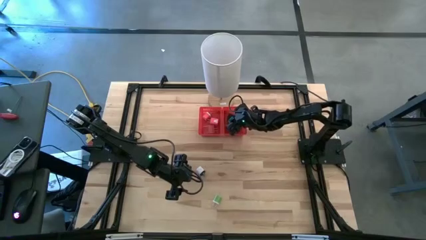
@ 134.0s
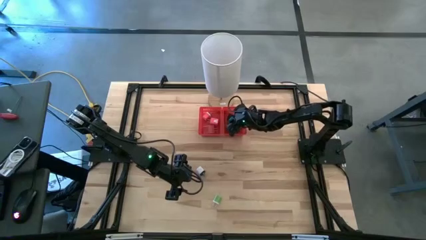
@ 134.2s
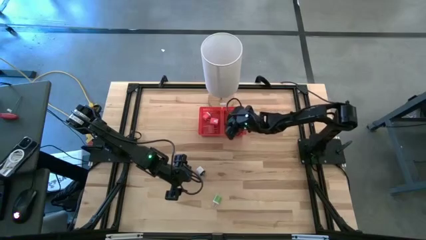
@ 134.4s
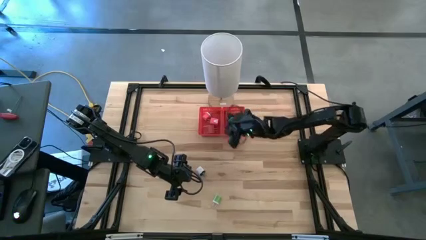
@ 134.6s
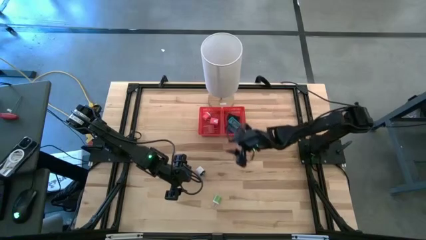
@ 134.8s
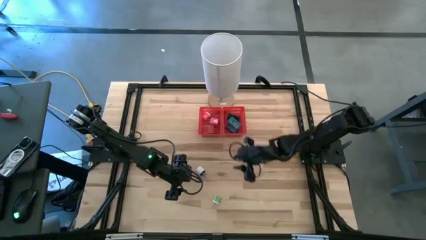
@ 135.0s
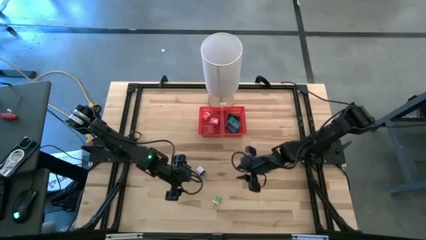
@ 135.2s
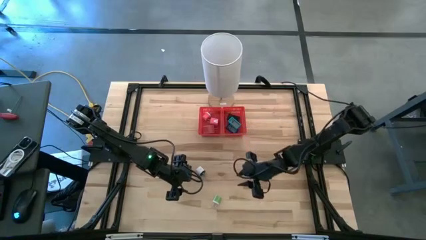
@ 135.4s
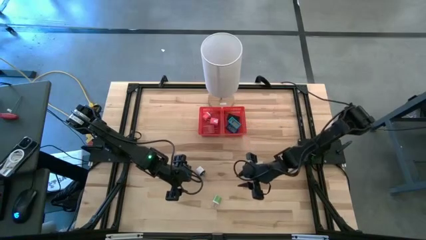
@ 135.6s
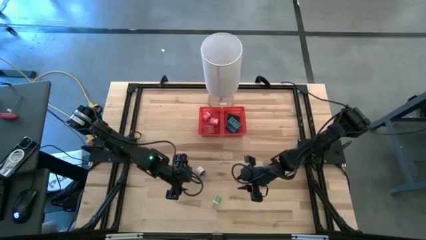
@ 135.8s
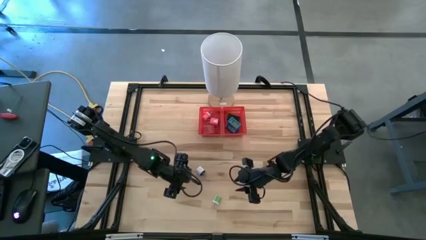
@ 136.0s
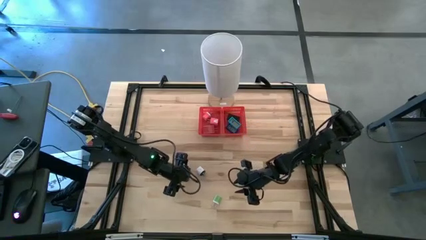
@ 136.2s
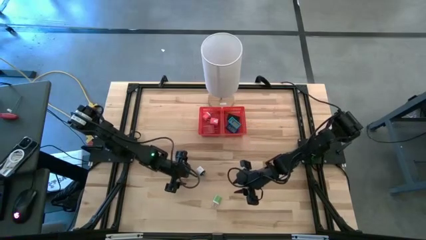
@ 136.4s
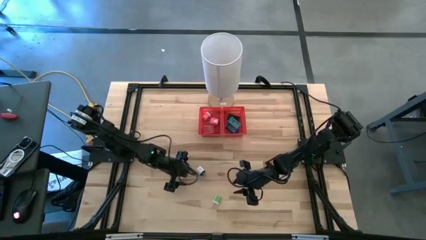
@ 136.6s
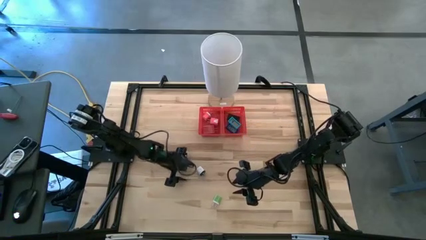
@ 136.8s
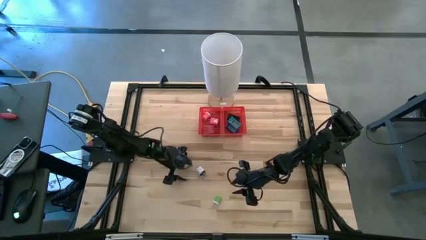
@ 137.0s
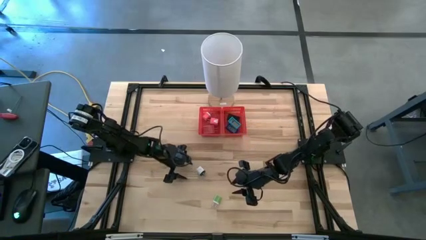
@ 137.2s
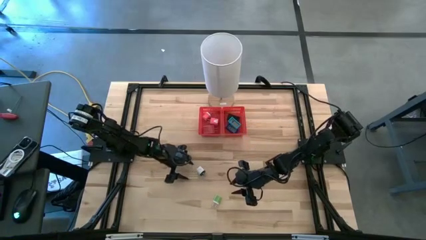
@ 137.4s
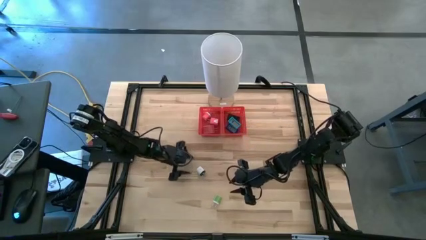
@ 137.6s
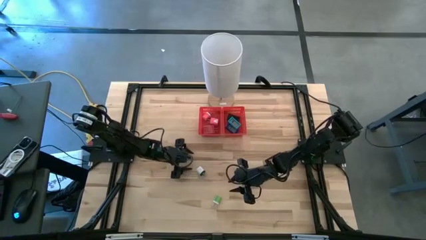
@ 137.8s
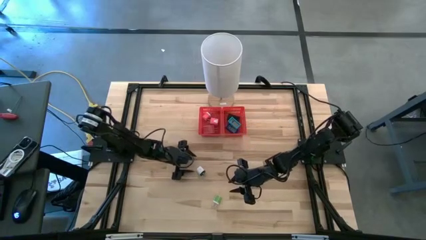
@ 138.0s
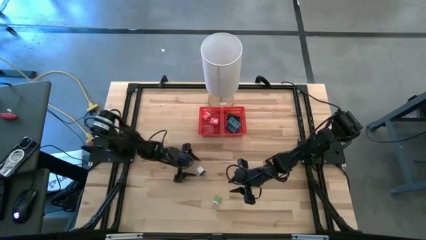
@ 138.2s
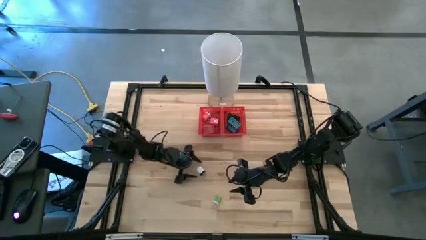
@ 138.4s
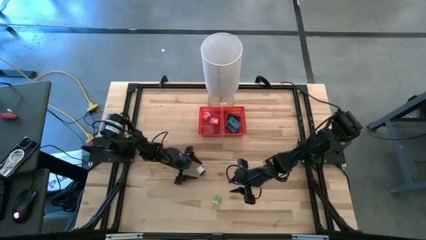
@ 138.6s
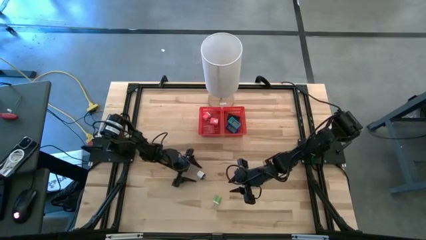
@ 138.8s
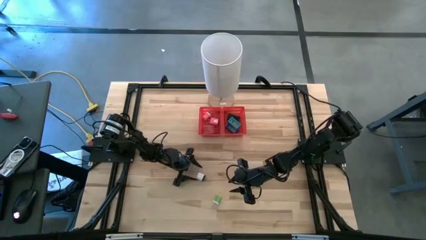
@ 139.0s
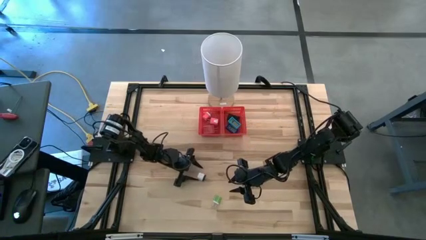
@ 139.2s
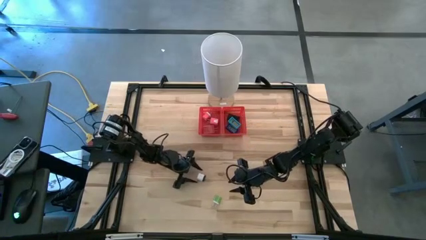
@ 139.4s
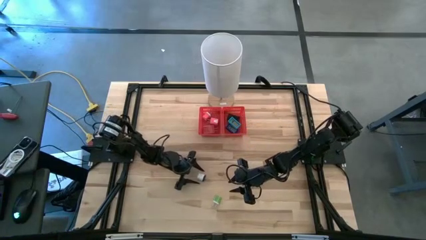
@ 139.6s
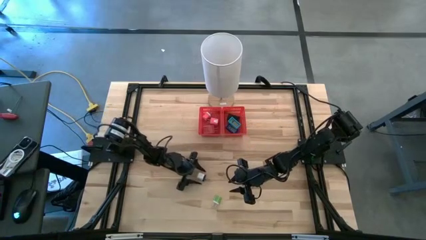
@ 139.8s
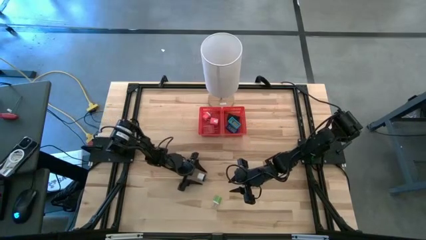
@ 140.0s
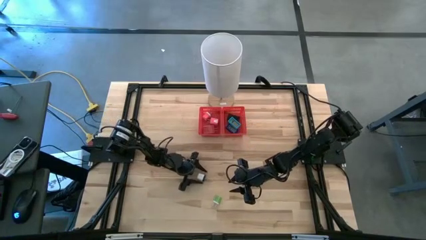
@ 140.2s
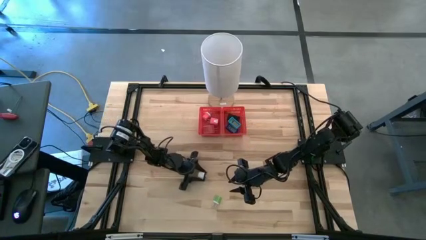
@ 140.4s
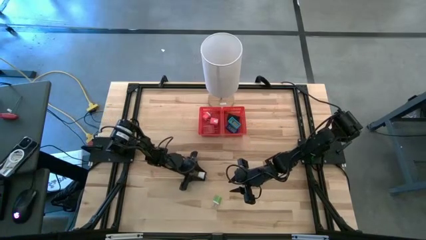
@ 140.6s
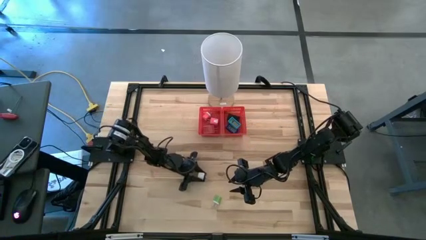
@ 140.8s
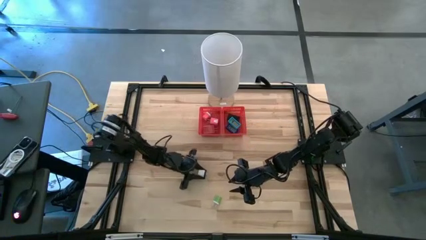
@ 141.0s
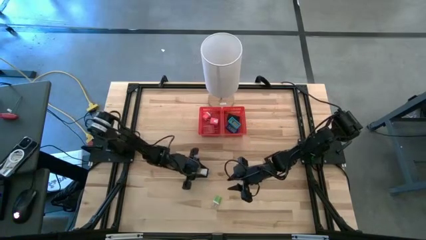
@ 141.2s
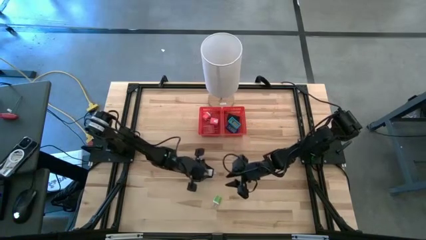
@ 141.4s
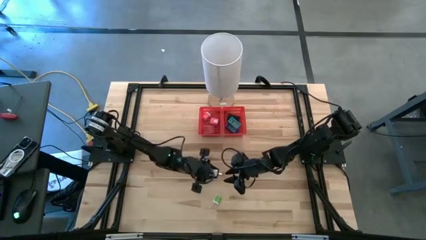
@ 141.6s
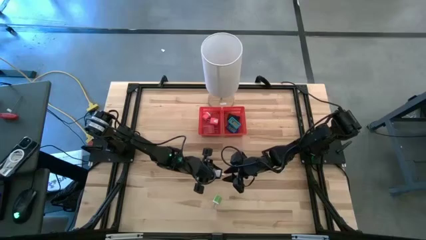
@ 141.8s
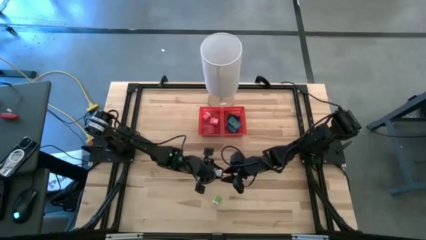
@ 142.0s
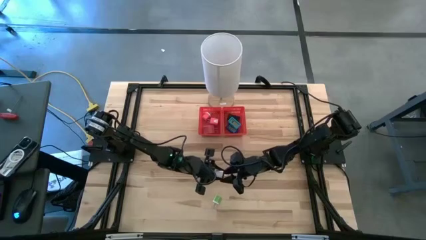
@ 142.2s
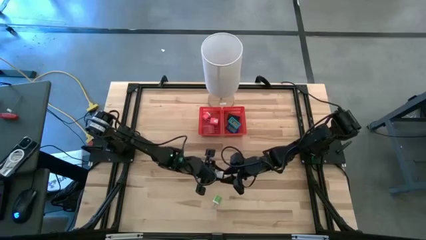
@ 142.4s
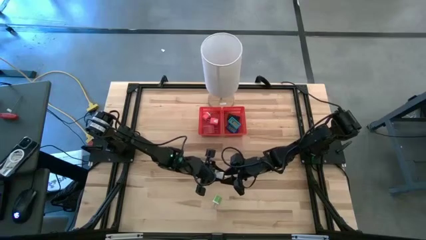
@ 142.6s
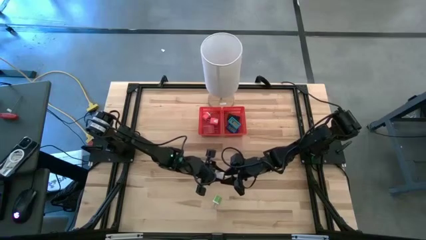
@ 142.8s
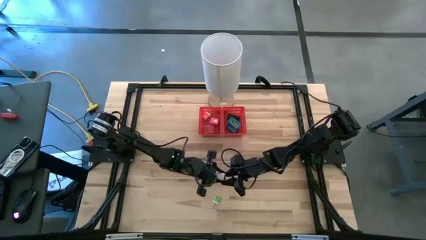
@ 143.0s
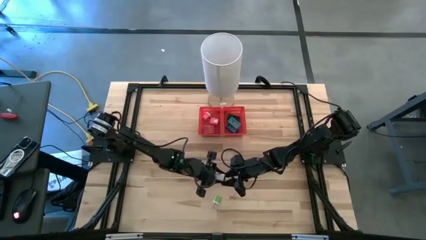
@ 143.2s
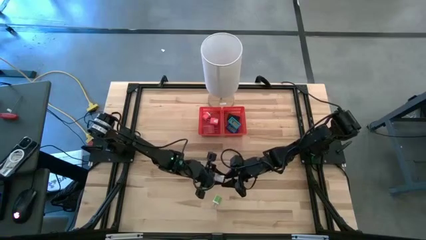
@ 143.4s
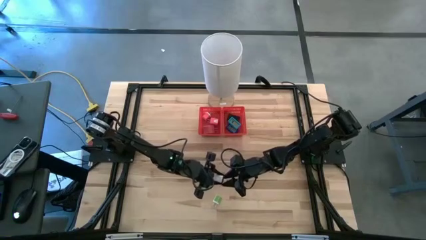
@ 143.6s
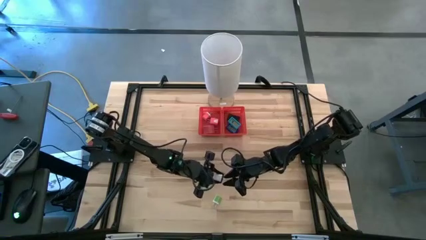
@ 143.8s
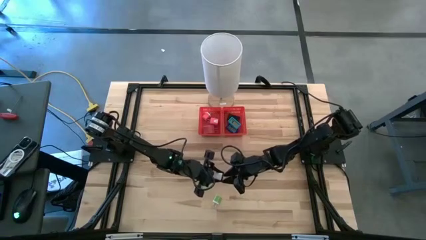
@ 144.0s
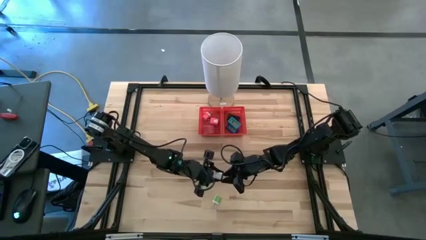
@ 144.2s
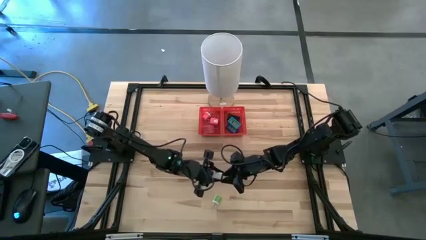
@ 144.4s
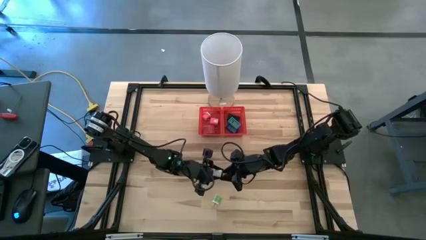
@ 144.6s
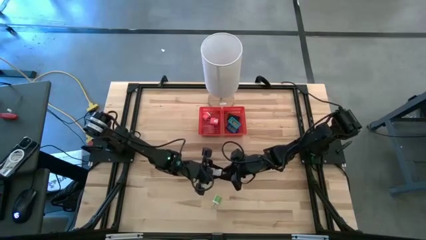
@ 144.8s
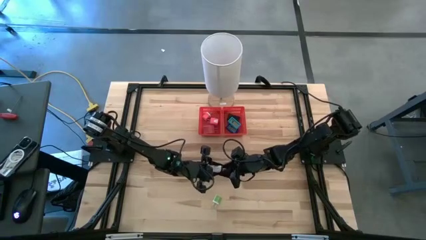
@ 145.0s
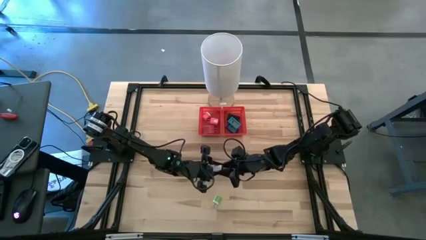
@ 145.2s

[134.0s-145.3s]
Task: Pick & Place Office items
Put the white charger adapter into the left red bin

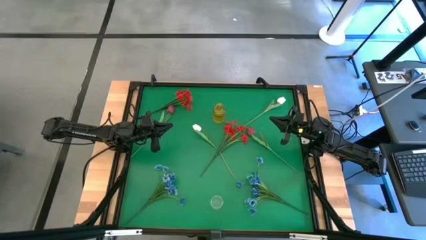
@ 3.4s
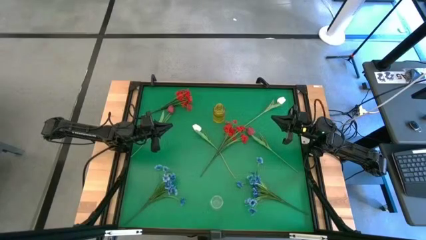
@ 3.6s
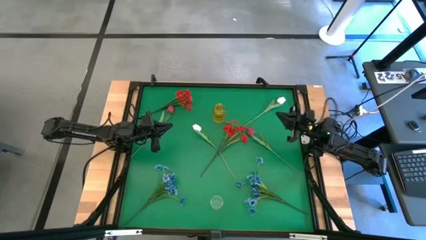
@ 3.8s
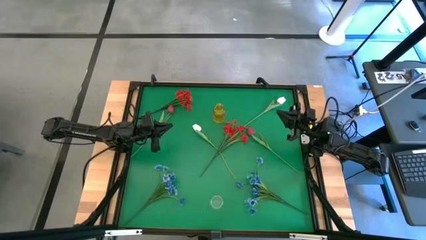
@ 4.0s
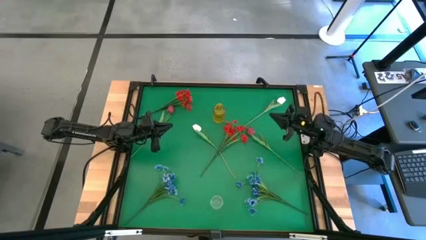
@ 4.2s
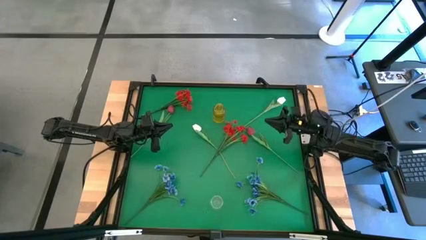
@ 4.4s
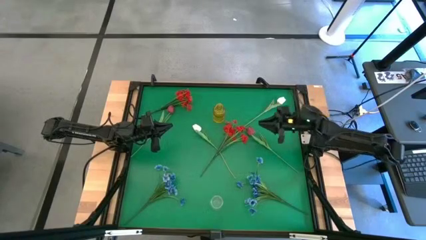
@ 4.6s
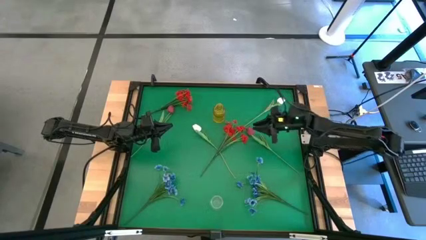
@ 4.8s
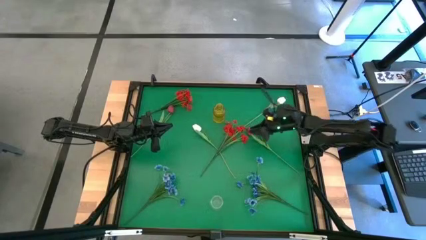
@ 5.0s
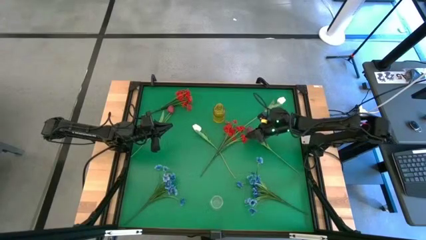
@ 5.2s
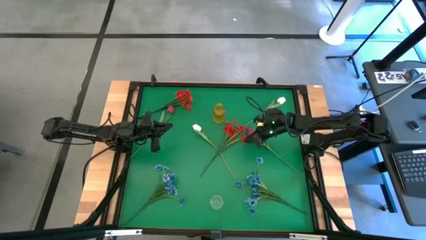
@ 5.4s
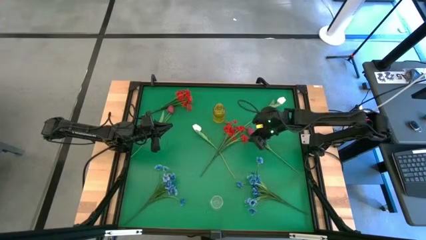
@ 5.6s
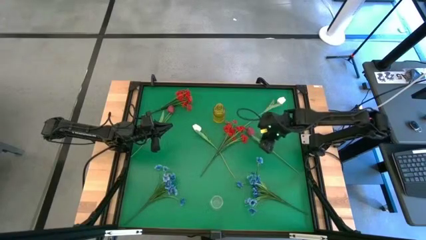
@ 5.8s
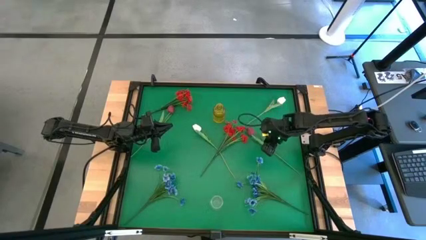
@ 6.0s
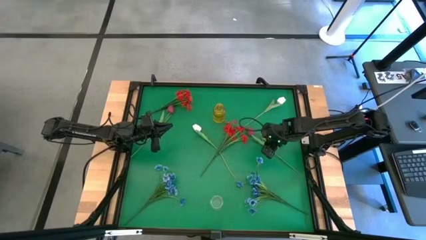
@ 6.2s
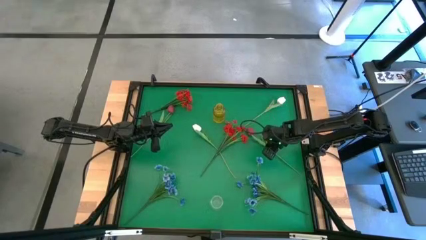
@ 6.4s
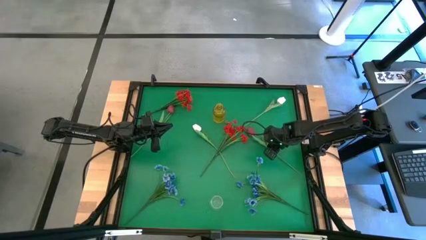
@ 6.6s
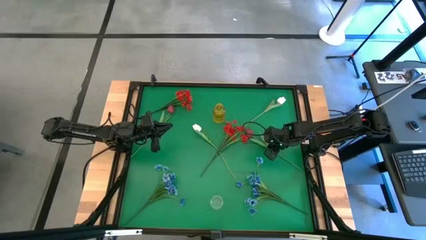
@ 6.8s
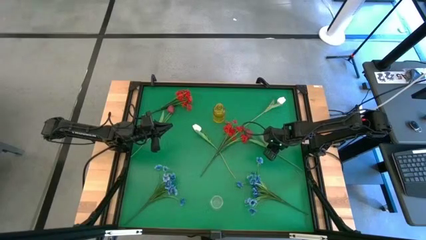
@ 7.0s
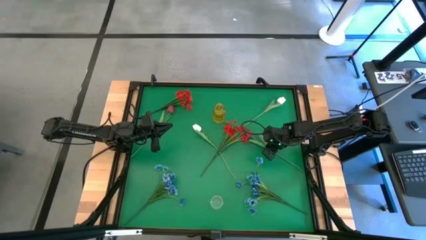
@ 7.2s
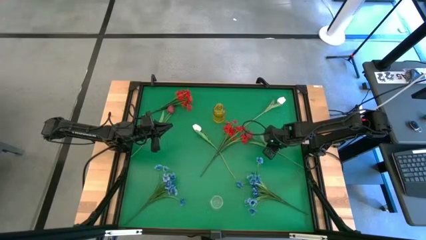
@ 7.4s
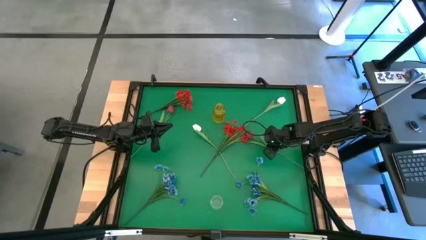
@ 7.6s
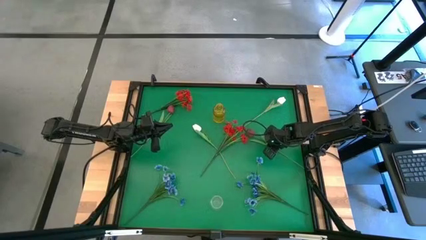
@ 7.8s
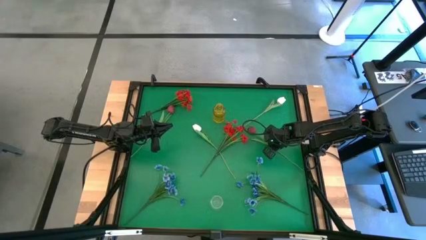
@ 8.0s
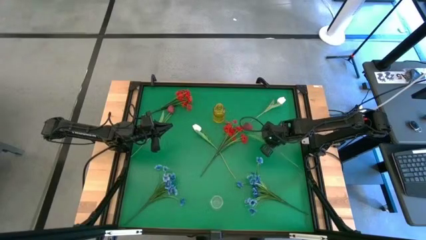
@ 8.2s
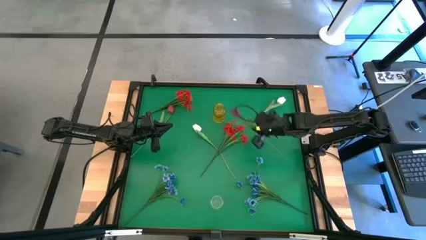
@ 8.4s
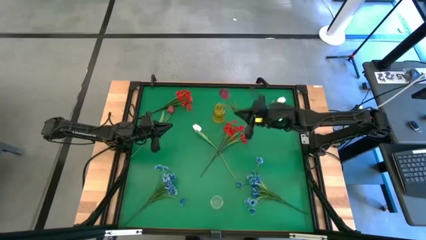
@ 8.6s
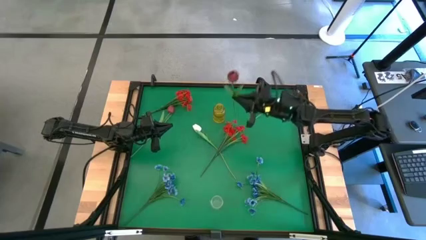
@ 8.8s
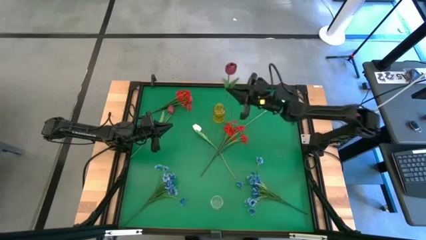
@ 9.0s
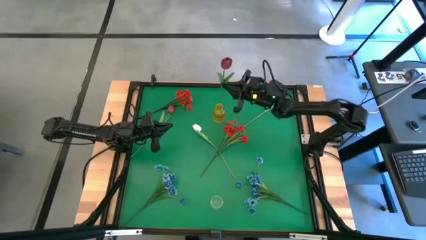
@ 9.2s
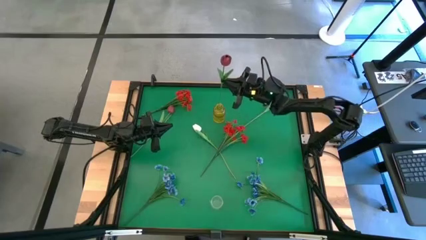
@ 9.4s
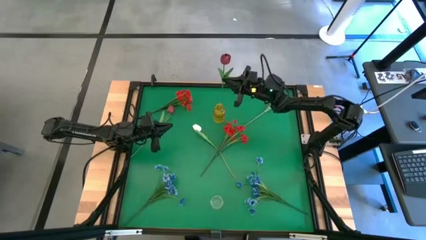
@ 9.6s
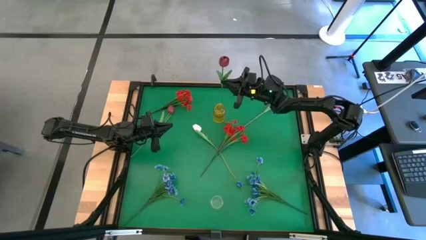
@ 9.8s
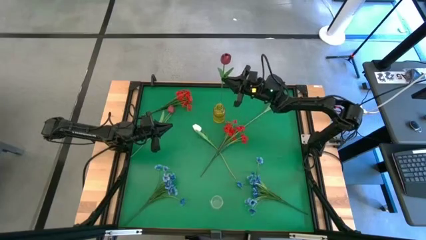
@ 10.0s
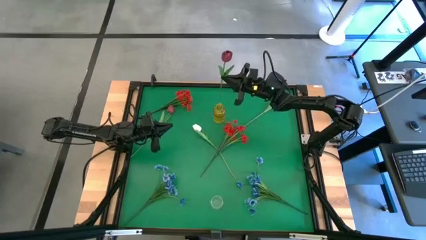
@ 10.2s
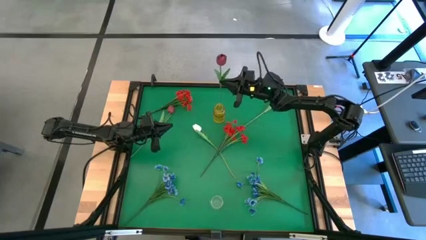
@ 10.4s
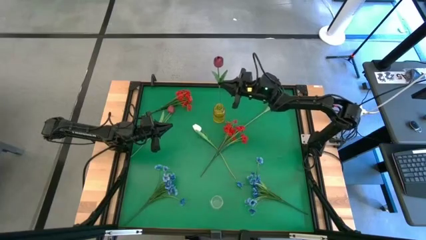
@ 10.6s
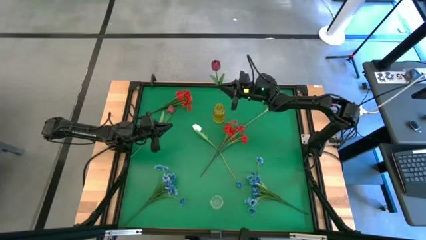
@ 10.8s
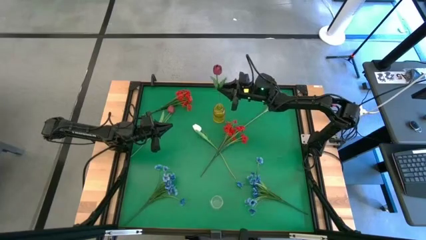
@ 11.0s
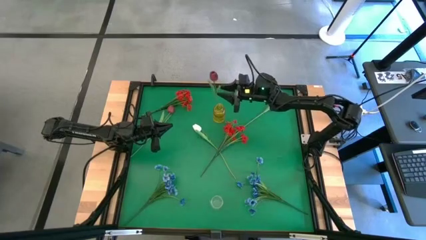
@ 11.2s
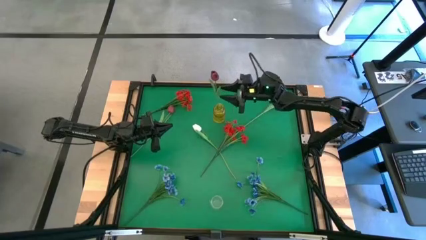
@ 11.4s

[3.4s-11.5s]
Task: Sort flowers into vase by color
Put the right red tulip into the yellow vase
